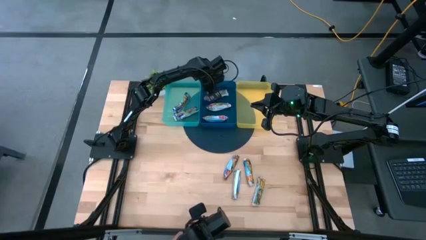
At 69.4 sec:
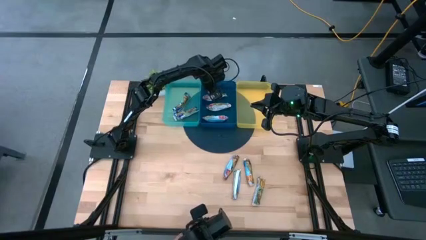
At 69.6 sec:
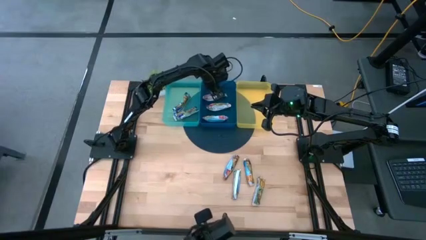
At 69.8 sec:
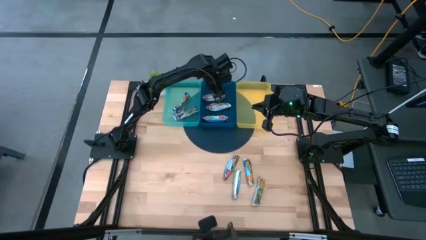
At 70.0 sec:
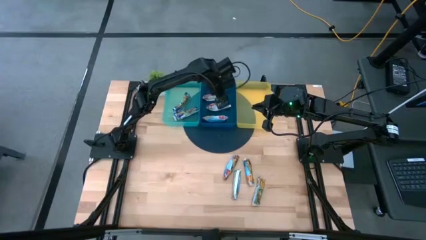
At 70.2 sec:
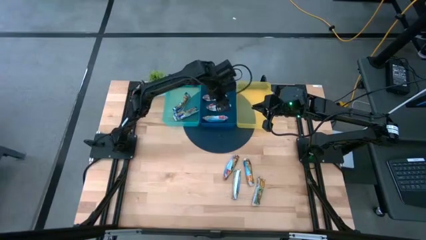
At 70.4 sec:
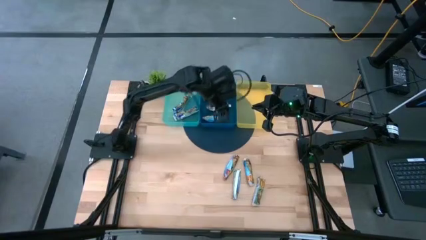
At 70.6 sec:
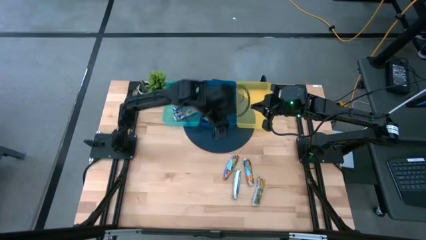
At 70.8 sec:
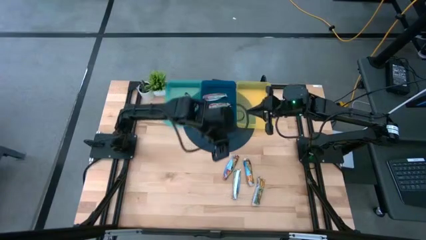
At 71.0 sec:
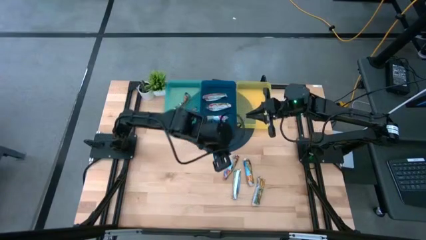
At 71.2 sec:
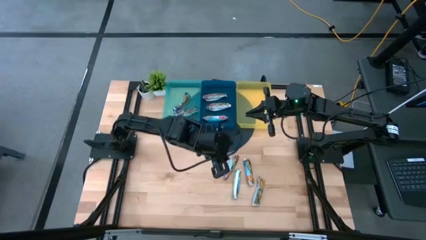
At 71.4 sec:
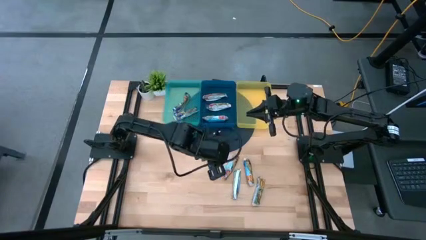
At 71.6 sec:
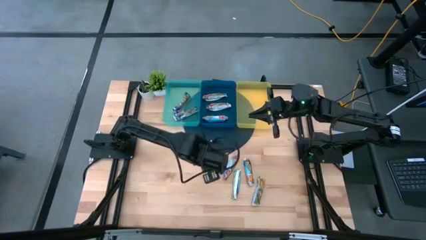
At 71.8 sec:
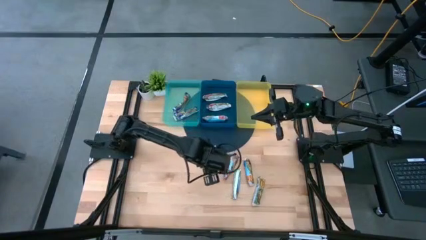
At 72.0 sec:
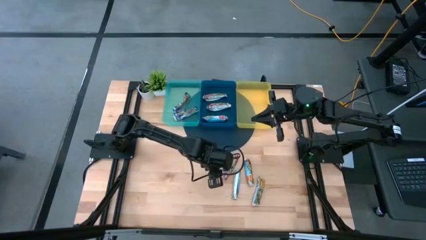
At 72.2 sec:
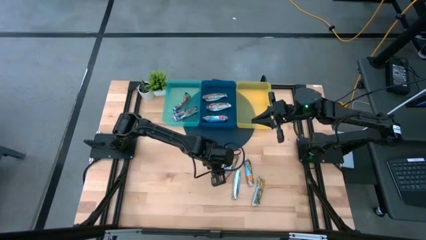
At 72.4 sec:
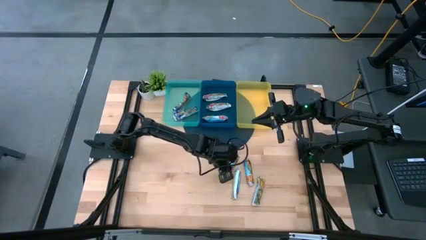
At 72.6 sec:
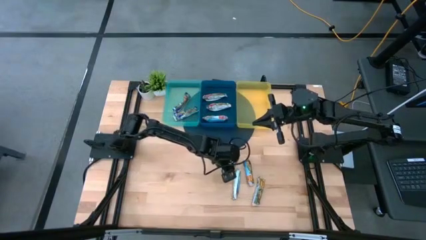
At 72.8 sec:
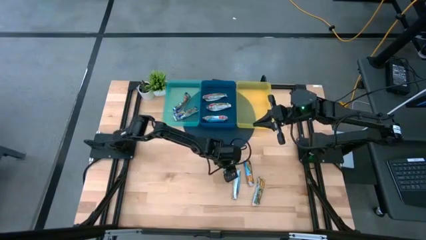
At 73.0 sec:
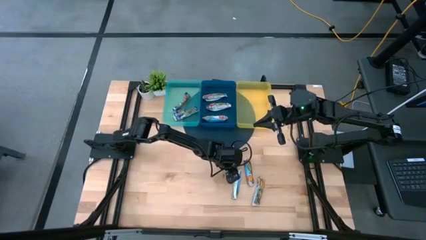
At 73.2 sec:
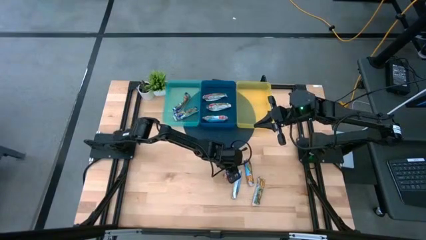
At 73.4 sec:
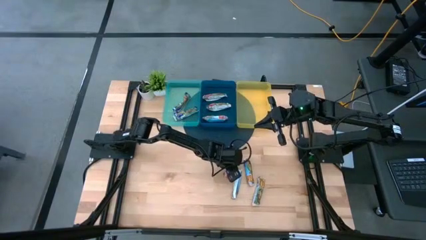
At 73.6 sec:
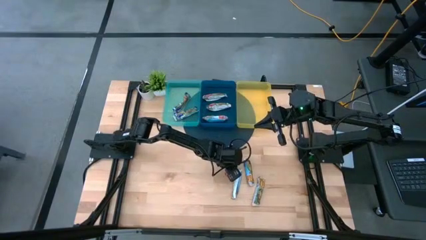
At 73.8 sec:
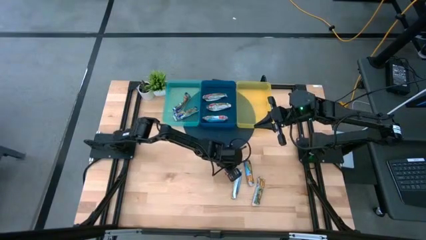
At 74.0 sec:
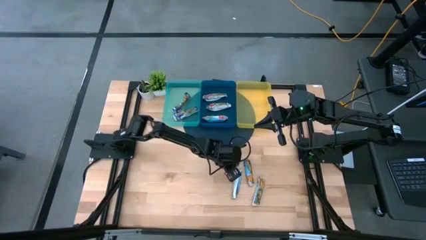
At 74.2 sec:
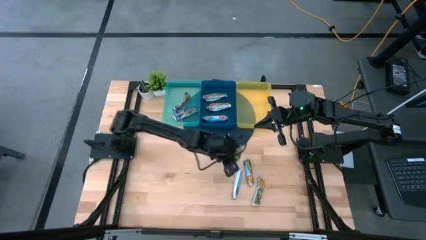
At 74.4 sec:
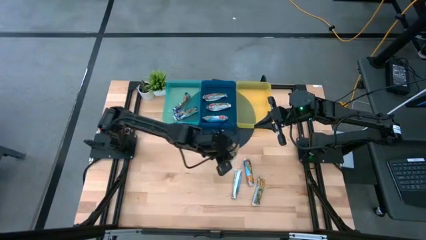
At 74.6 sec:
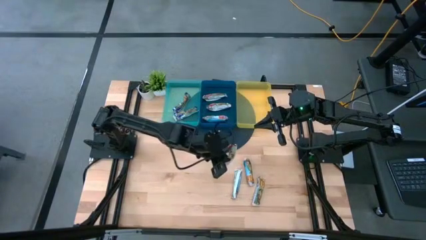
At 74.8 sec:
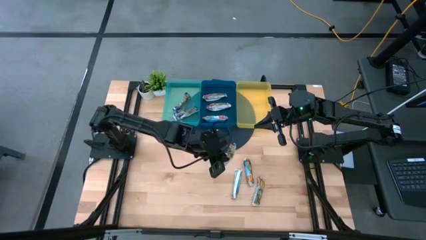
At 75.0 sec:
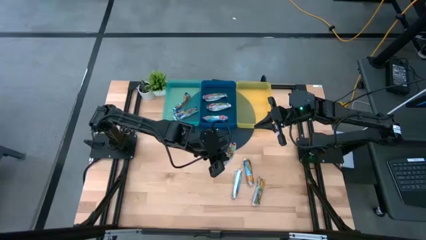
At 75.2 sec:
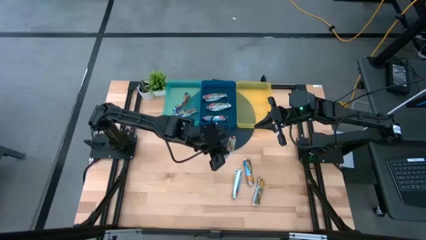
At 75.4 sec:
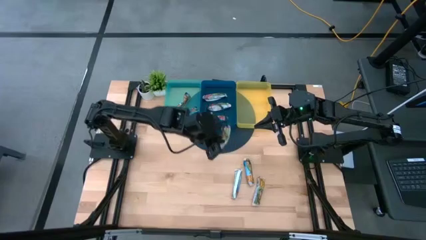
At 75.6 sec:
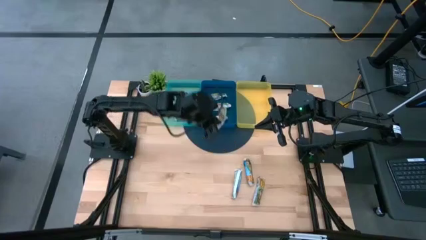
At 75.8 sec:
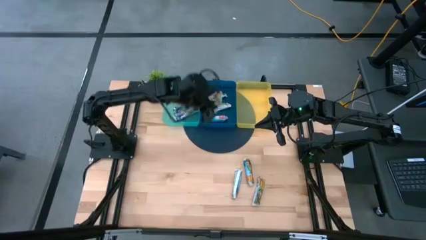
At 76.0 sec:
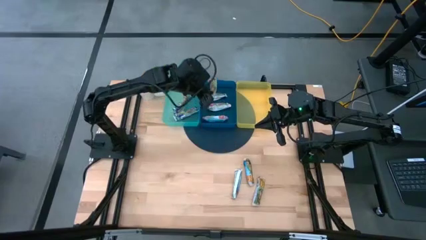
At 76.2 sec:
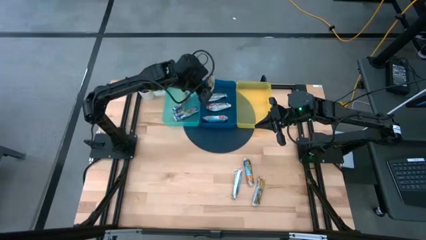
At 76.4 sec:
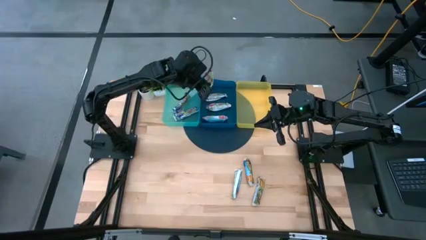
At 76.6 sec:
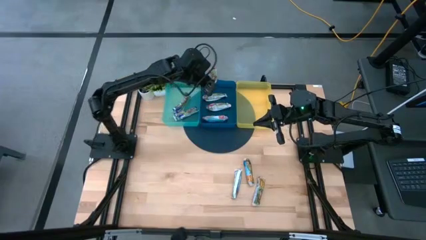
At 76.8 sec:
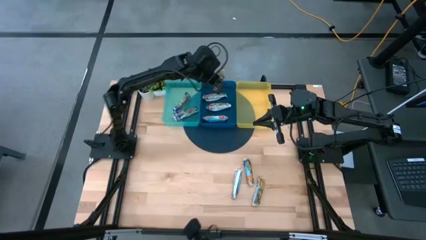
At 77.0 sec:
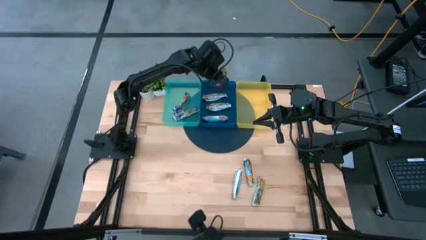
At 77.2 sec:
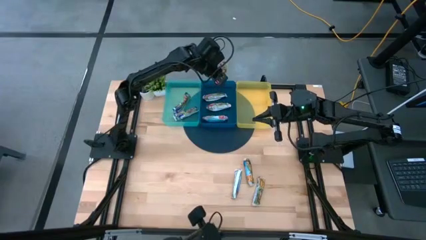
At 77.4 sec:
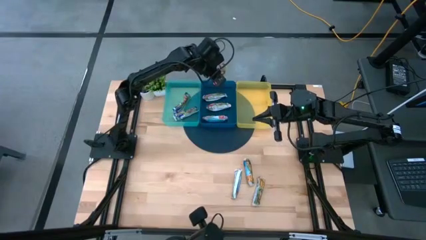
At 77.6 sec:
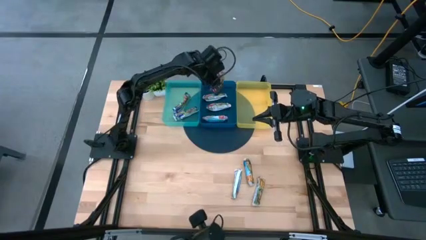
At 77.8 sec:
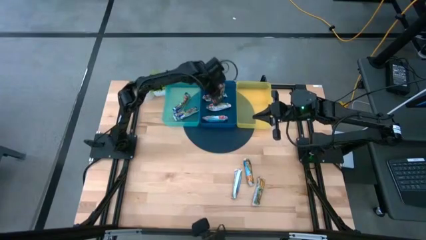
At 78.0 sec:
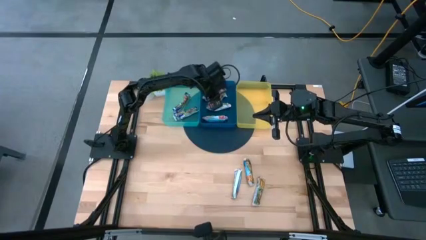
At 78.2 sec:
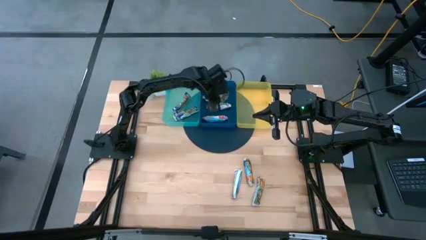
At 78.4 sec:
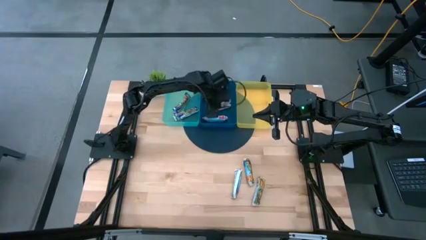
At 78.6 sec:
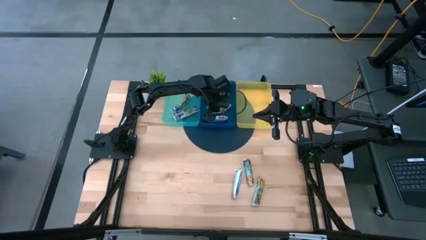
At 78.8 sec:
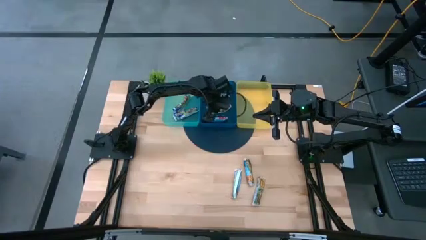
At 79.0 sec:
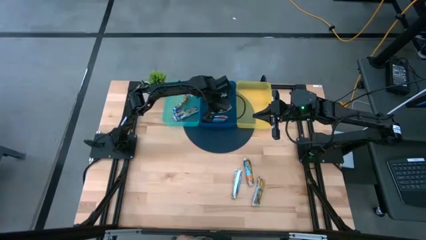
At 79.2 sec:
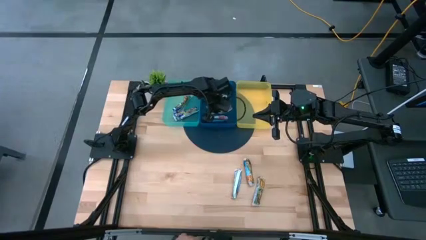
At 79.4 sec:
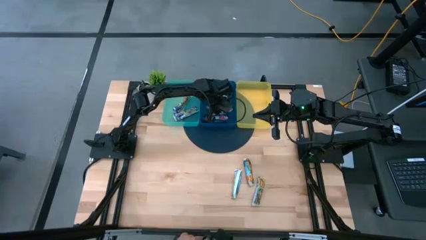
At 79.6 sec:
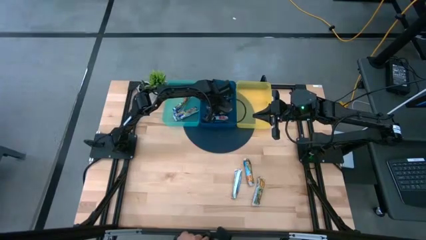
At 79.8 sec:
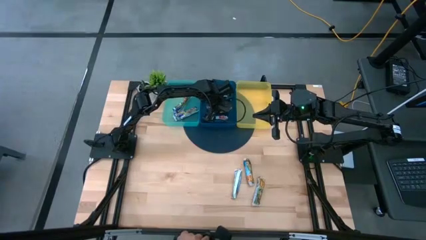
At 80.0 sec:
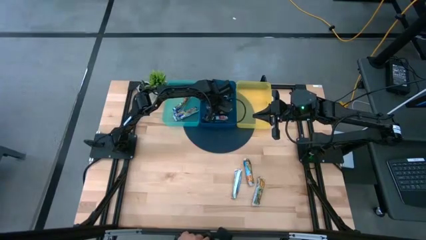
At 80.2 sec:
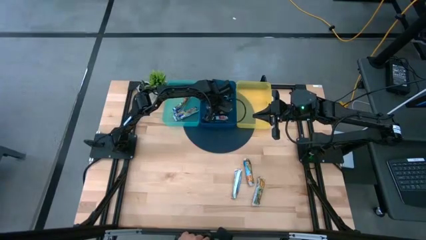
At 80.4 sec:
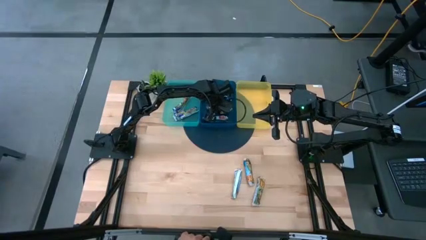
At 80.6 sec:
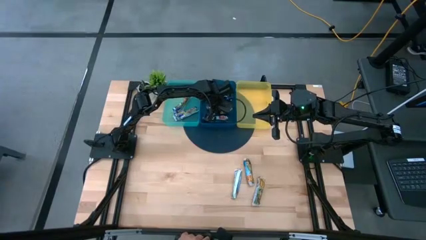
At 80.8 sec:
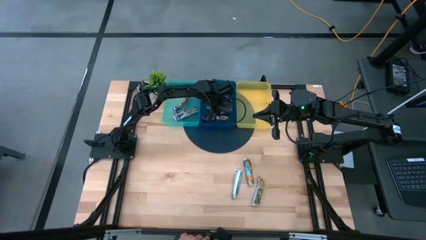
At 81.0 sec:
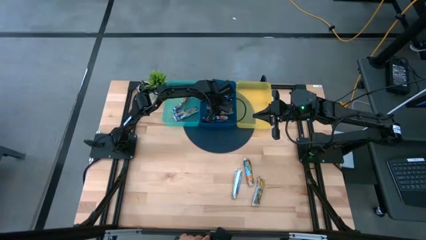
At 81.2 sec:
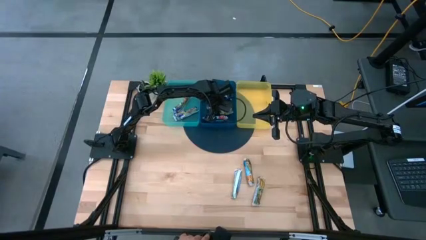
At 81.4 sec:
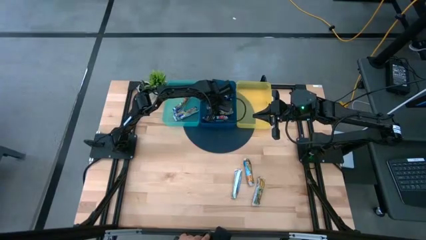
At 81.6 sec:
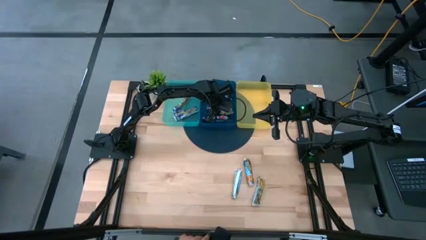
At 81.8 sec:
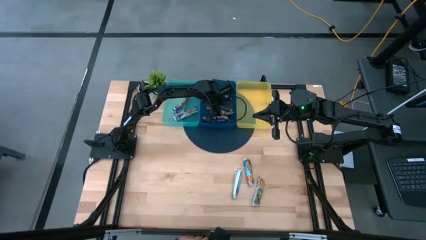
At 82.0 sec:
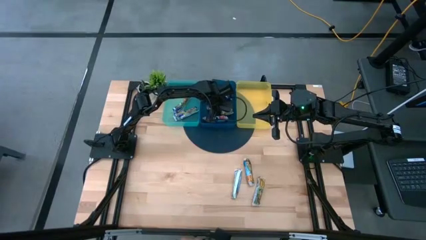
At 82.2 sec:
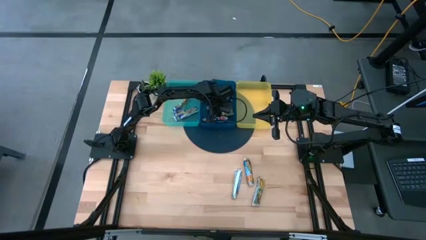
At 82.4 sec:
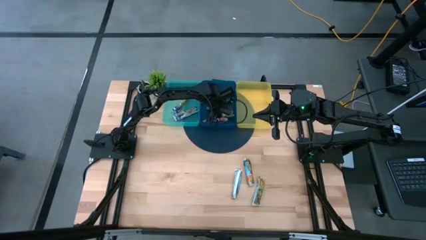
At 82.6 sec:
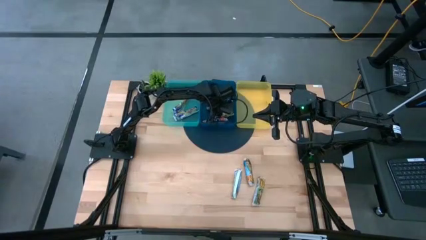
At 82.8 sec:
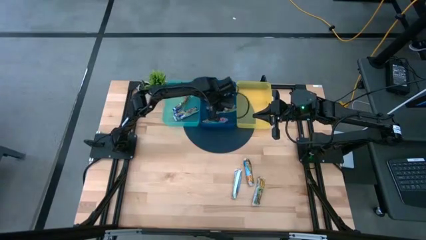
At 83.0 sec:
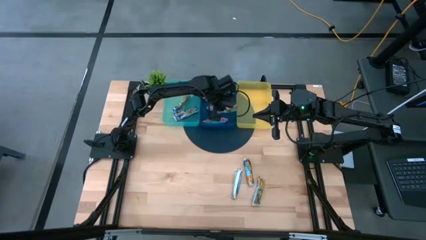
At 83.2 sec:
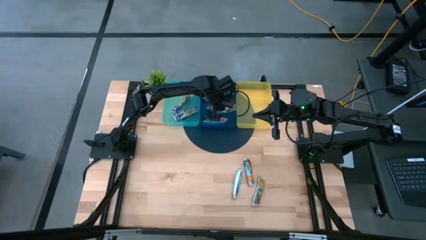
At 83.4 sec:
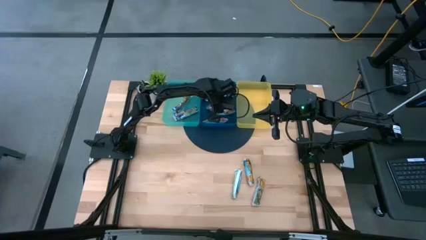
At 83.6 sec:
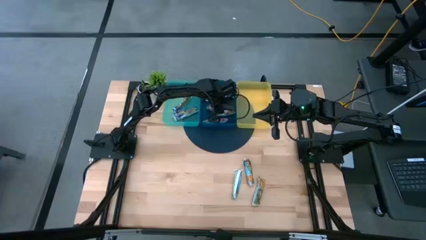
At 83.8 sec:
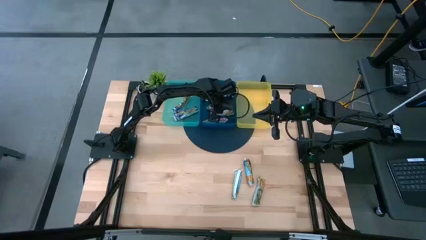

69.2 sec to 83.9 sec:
Task: Pick and place Granola Bars by type
Put the red granola bar into the blue bin
